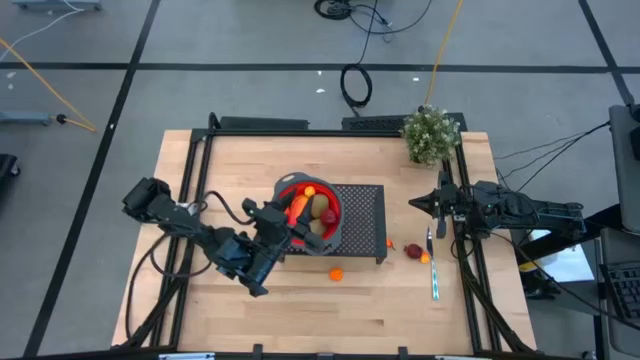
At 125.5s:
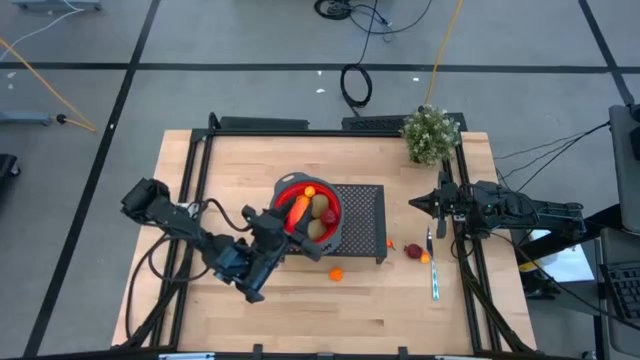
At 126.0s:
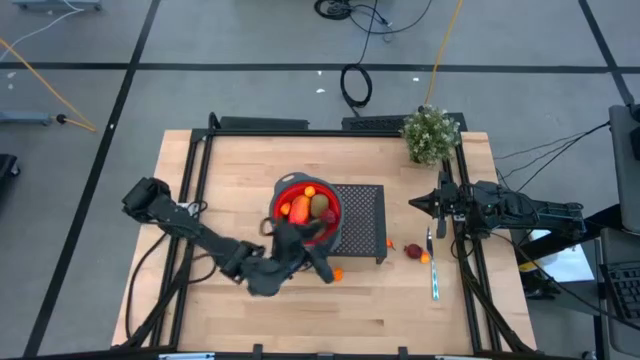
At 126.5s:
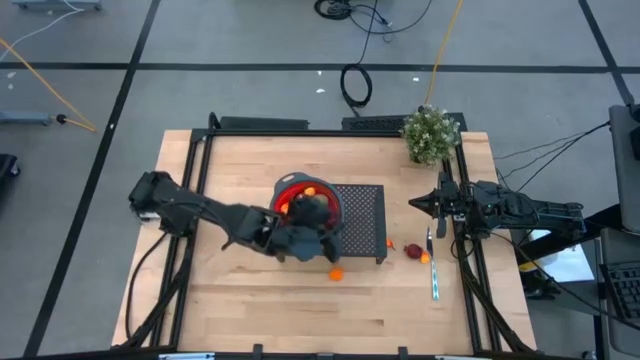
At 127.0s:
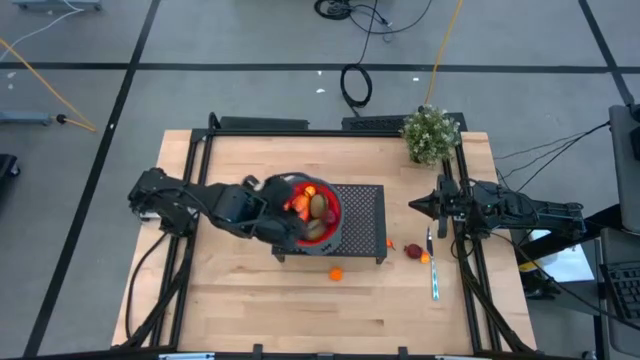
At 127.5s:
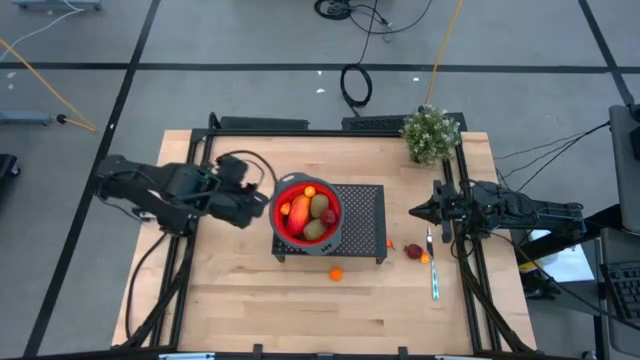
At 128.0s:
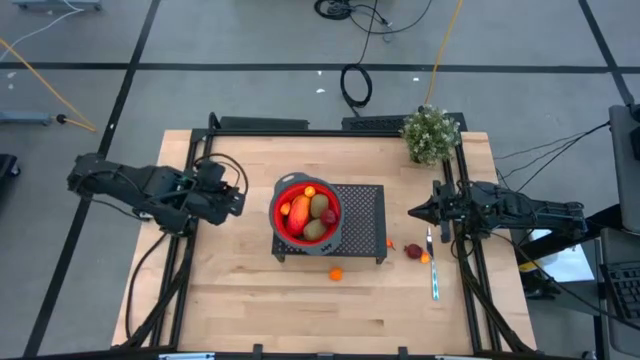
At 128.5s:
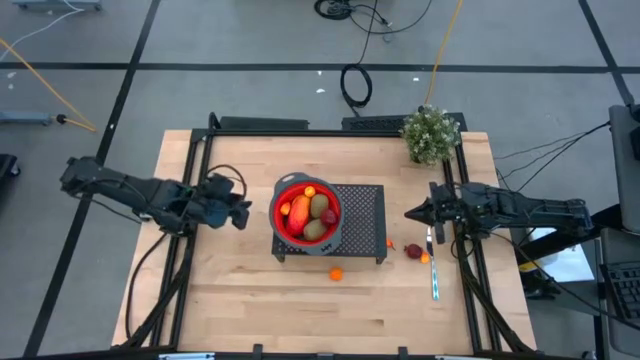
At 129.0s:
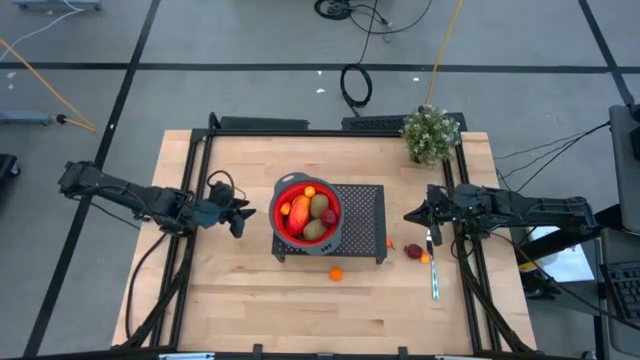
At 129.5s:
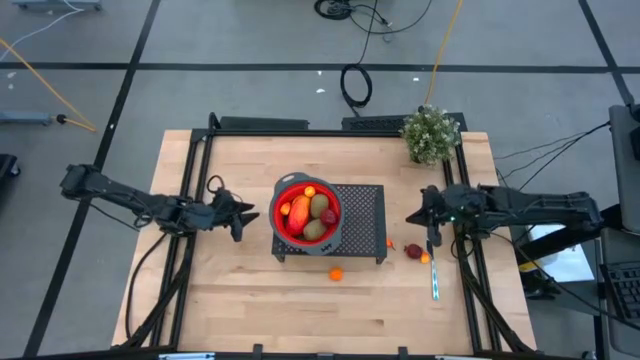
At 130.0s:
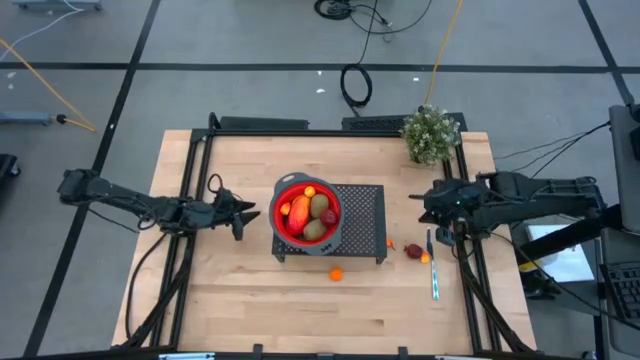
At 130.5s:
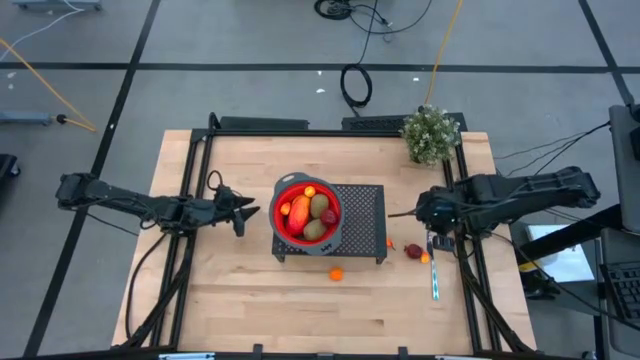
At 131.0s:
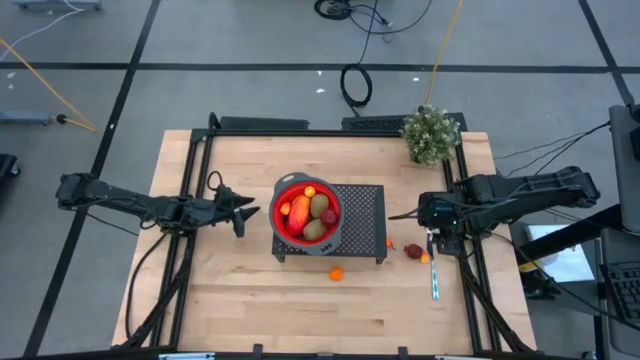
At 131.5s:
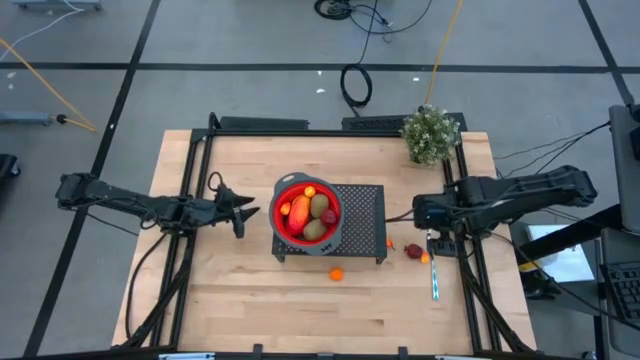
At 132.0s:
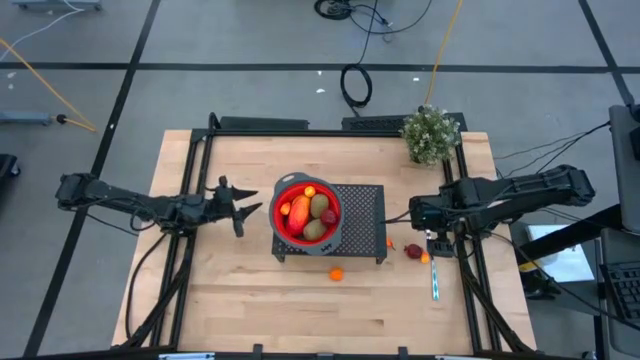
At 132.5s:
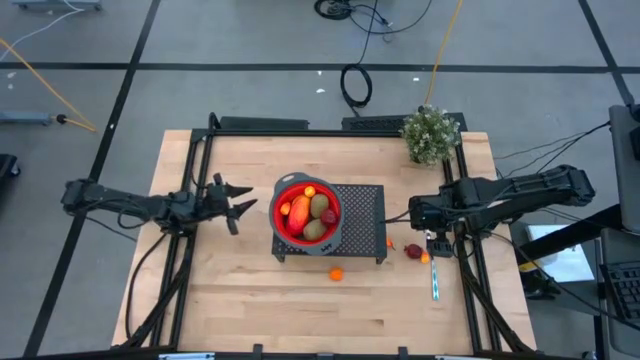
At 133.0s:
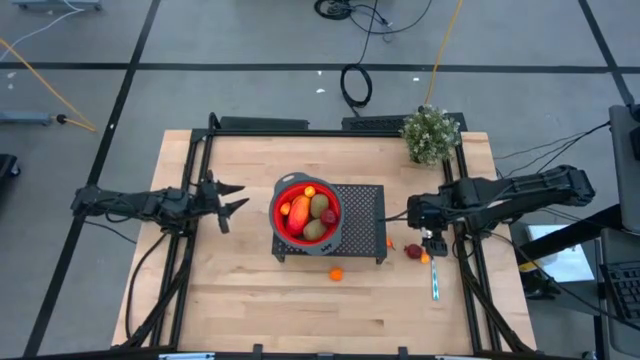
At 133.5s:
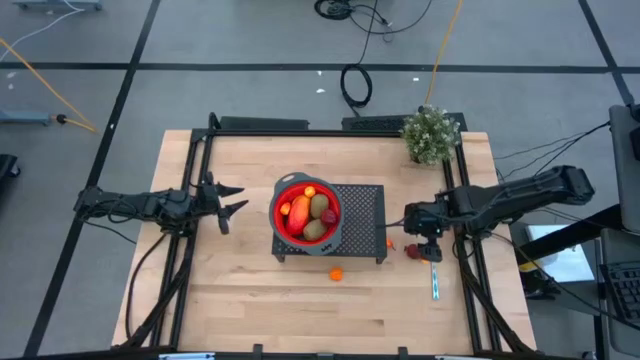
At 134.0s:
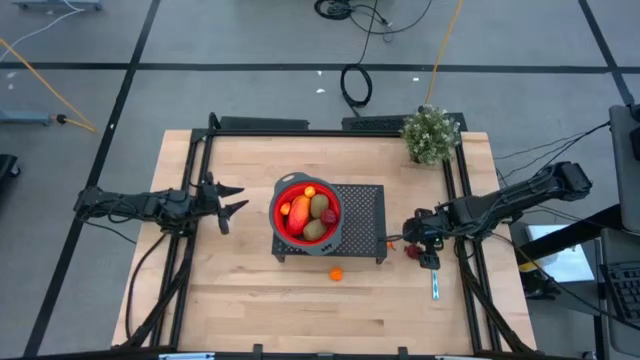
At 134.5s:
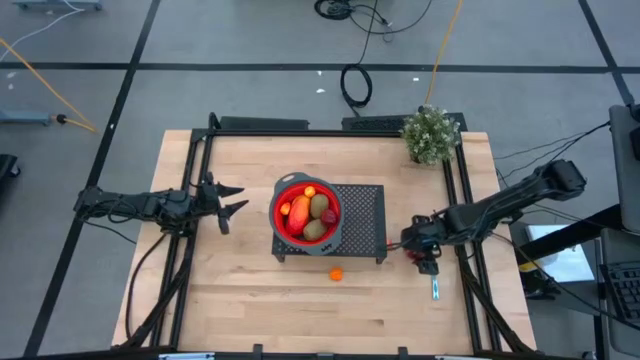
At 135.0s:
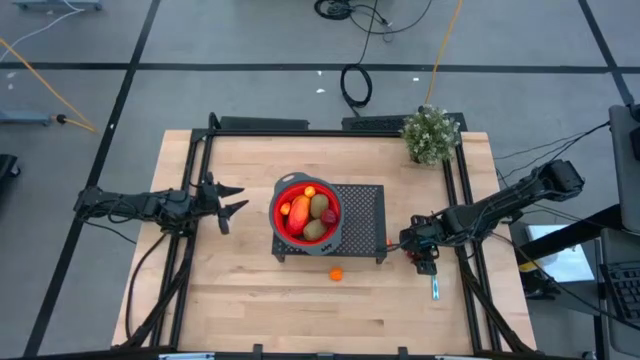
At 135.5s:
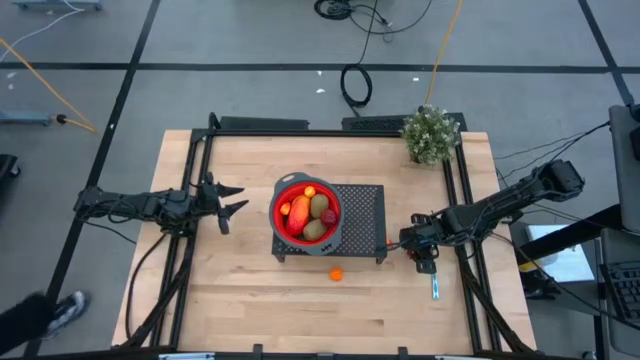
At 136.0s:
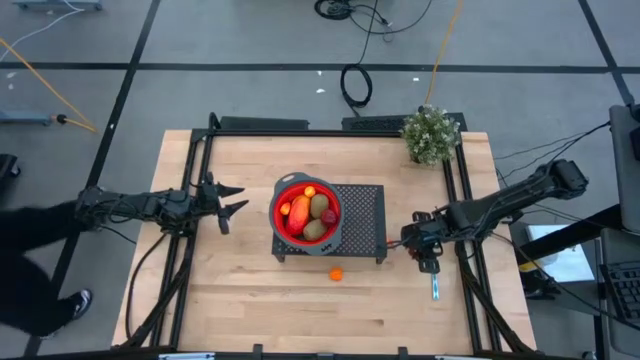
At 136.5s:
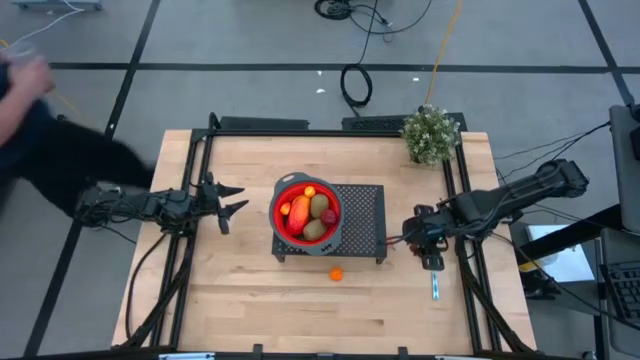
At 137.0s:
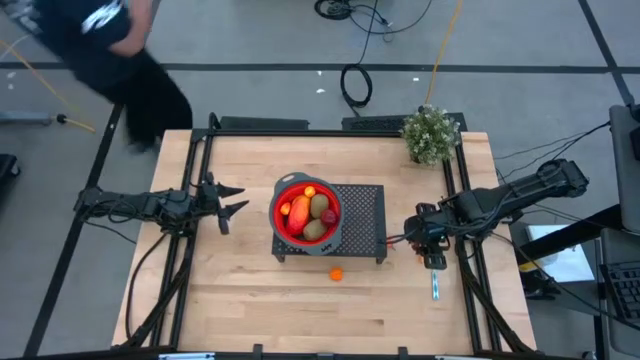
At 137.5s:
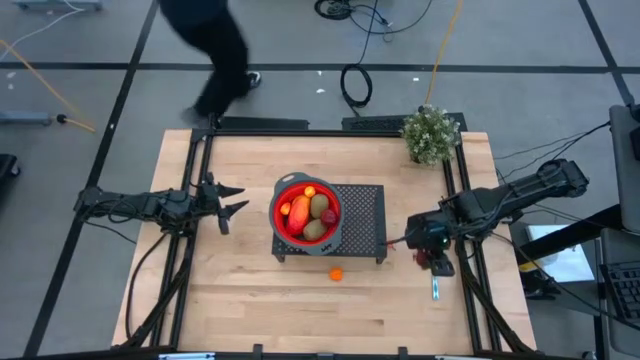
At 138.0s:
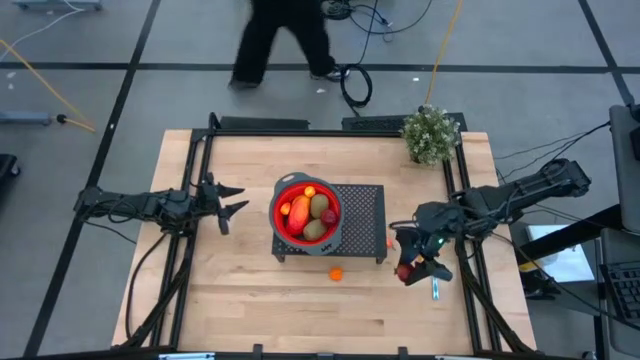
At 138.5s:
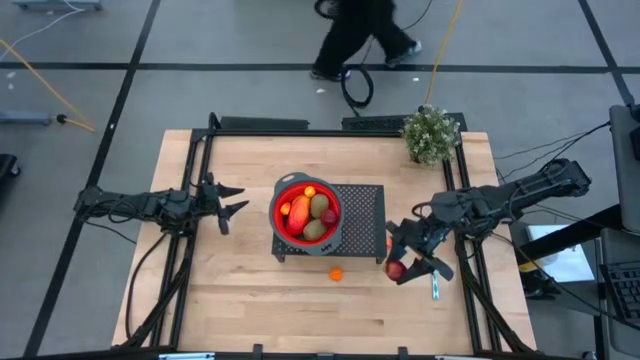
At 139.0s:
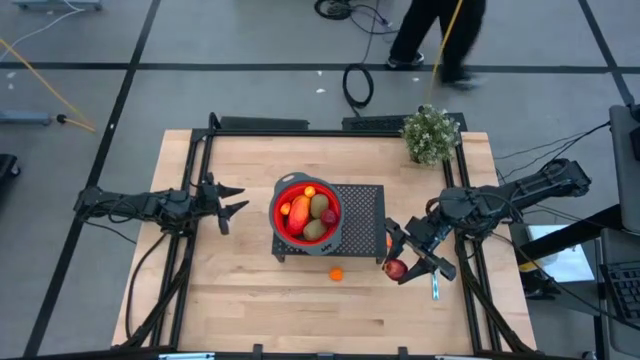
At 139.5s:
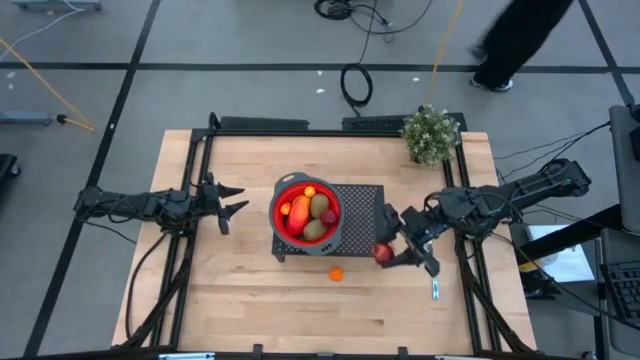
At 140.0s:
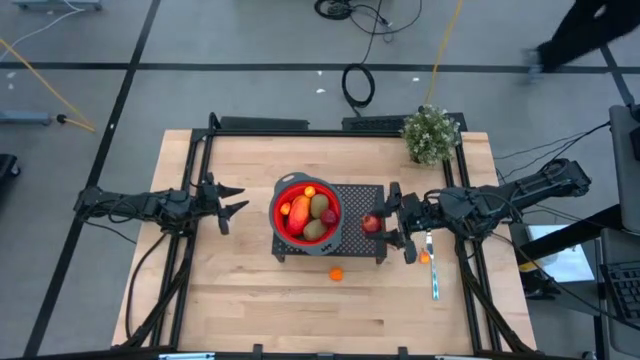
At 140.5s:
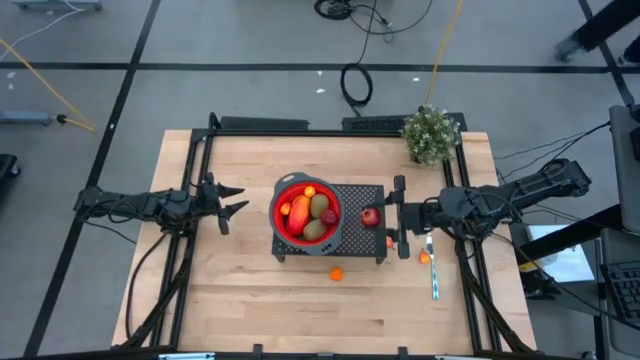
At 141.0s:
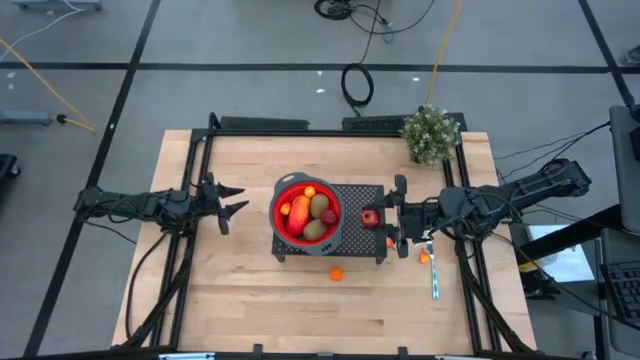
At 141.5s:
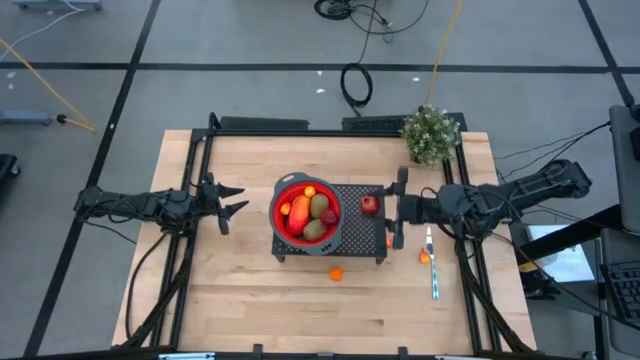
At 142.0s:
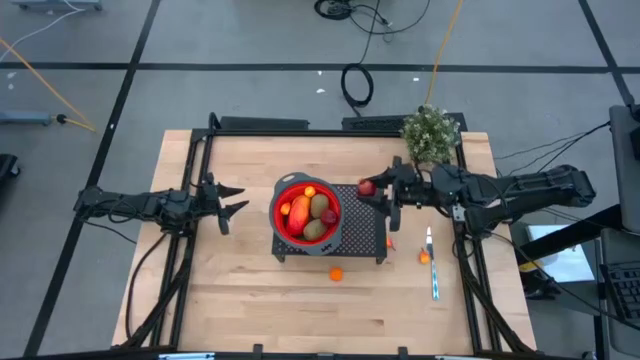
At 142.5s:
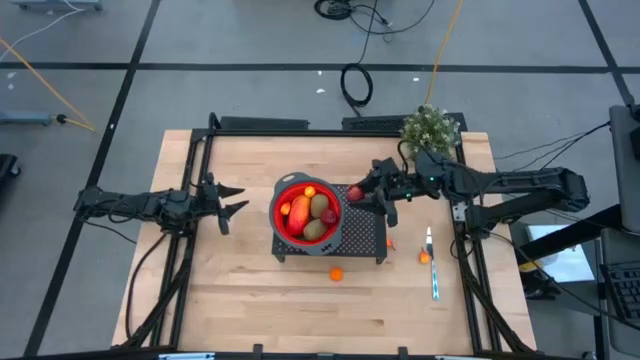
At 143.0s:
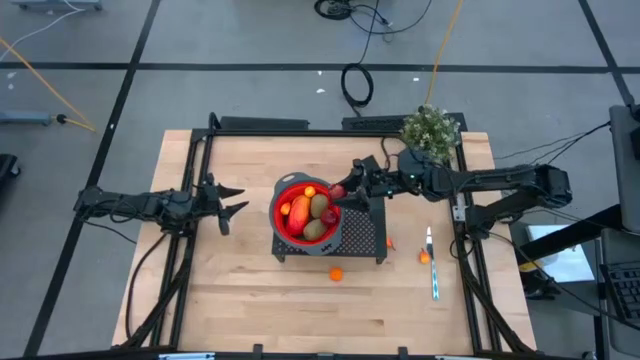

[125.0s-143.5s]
Task: Pick & Place Fruit
Put the pomegranate into the red colander on the shelf

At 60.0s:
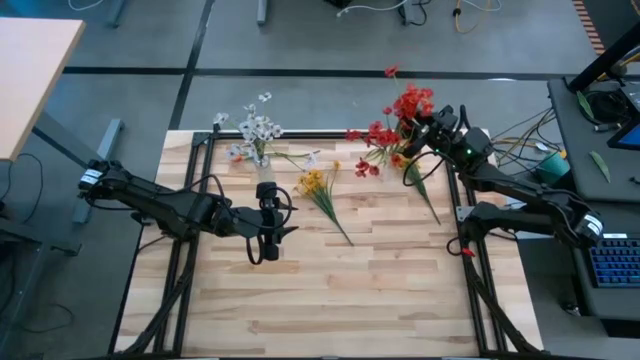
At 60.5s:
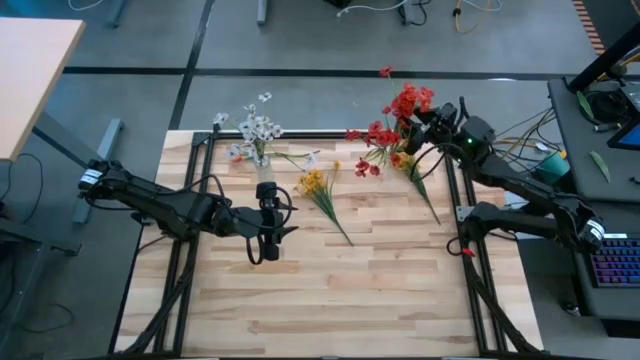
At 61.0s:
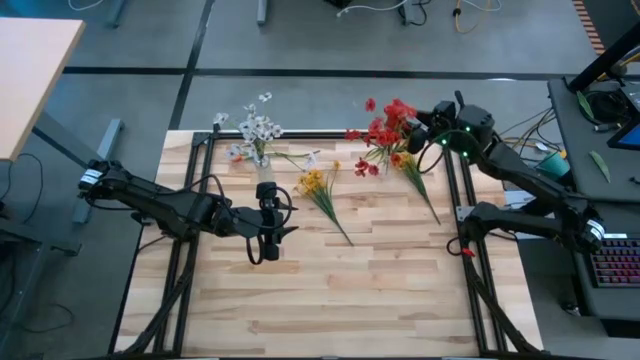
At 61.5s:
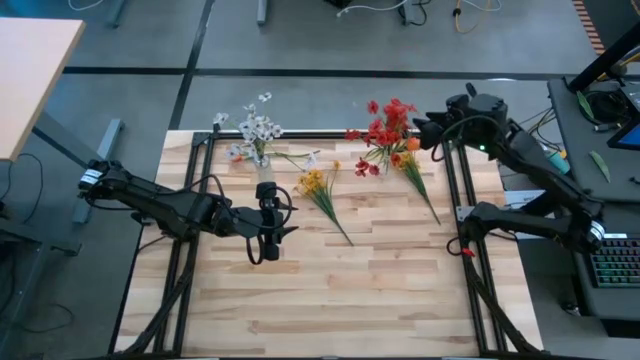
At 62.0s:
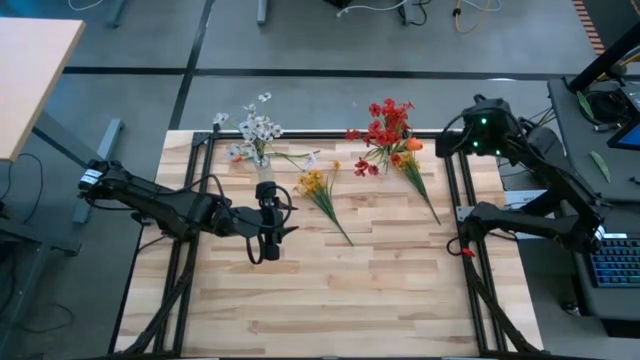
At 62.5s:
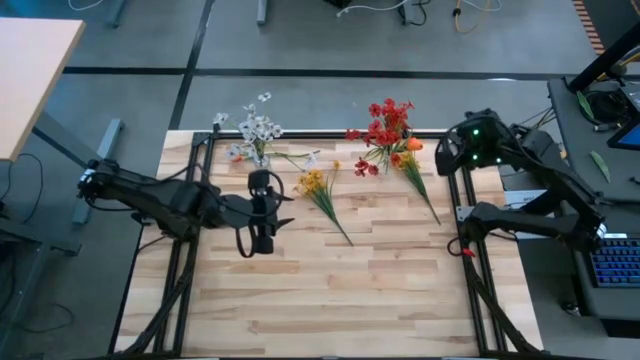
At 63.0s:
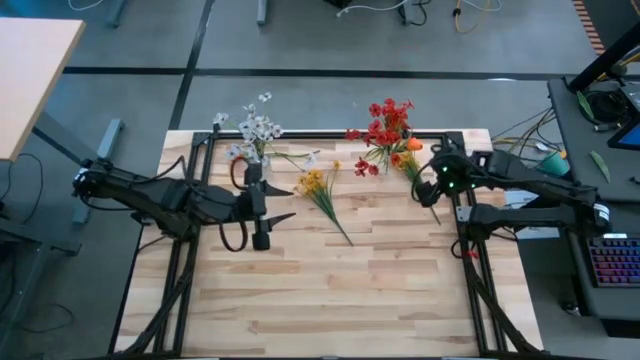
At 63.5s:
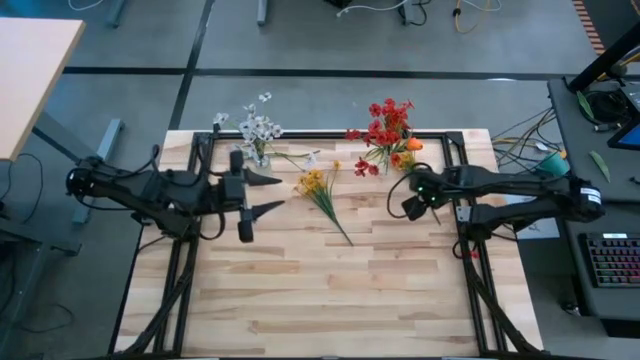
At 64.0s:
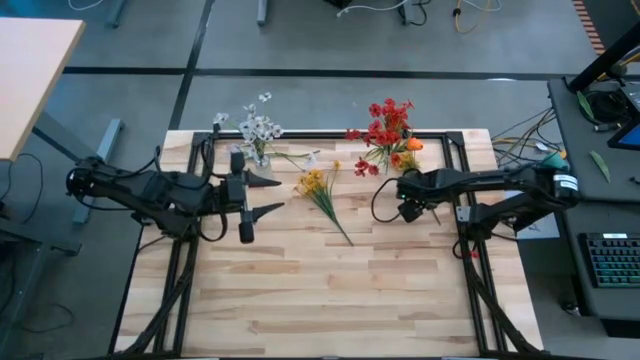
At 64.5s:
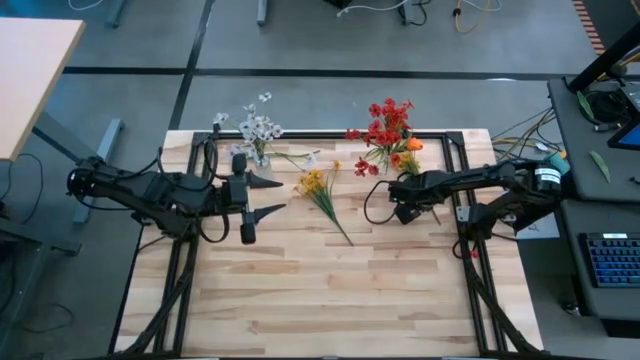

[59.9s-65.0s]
Task: Sort flowers into vase by color
Put the right yellow flowers into the left transparent flower vase
